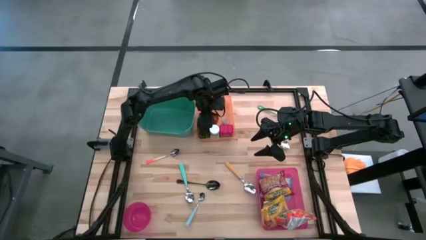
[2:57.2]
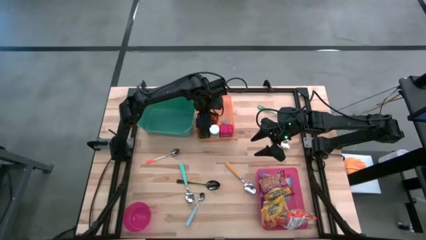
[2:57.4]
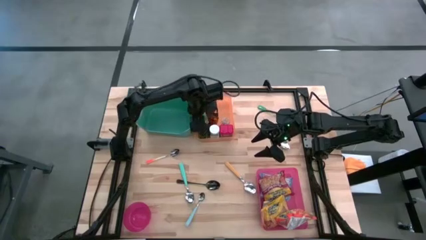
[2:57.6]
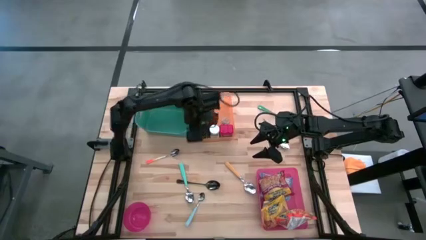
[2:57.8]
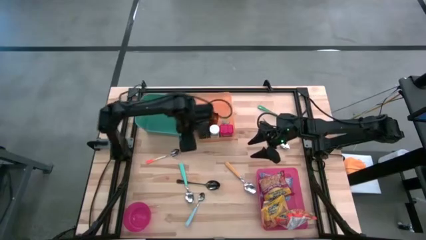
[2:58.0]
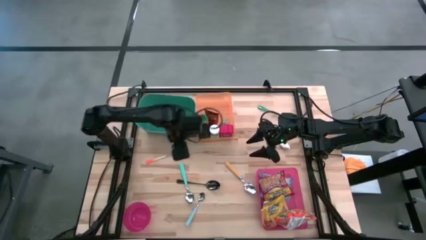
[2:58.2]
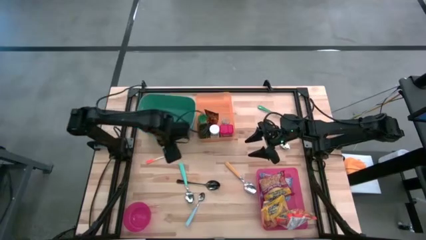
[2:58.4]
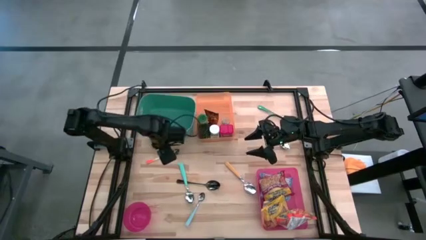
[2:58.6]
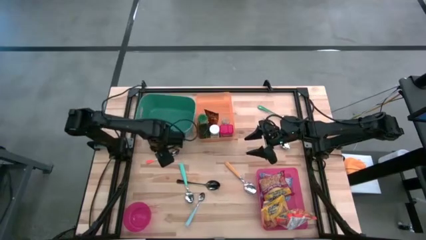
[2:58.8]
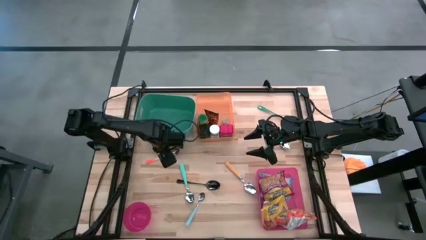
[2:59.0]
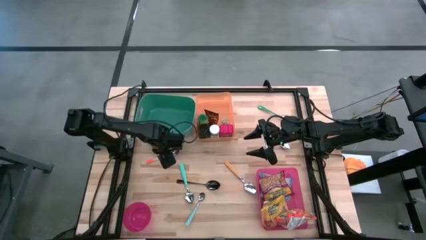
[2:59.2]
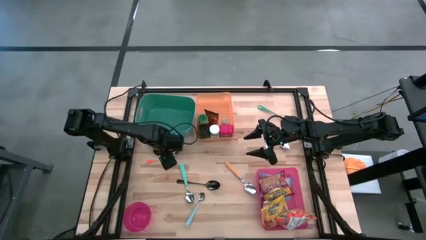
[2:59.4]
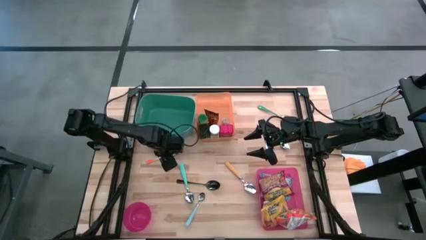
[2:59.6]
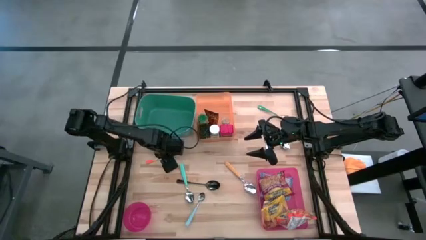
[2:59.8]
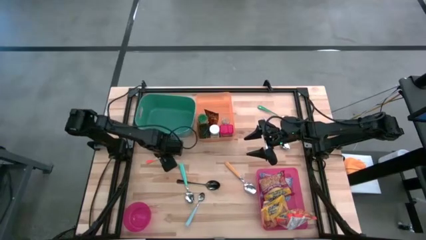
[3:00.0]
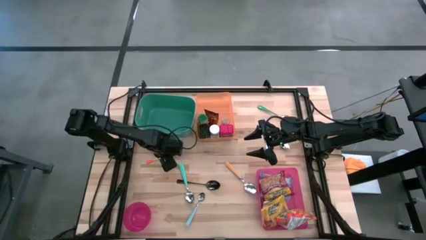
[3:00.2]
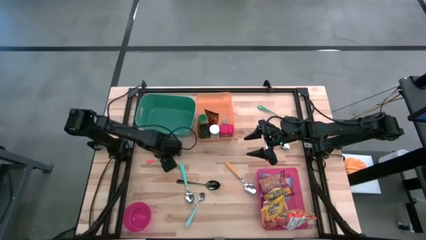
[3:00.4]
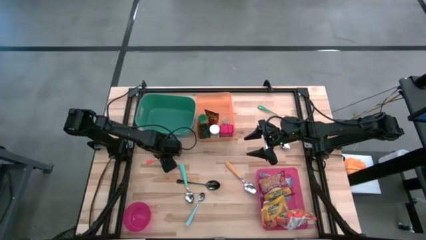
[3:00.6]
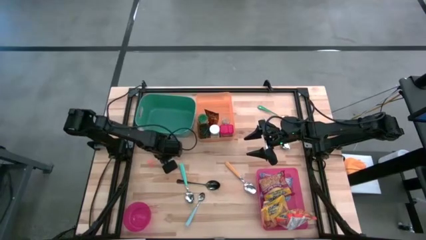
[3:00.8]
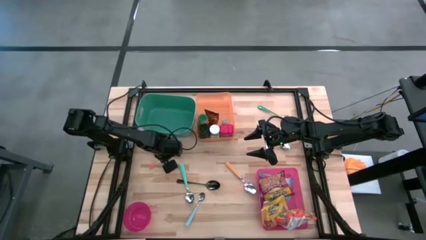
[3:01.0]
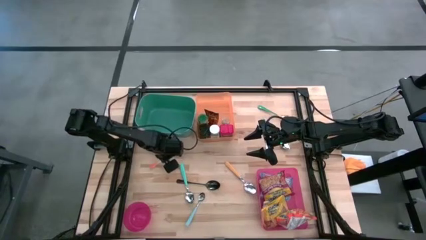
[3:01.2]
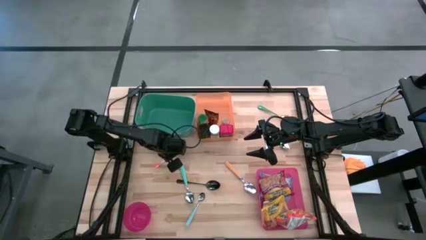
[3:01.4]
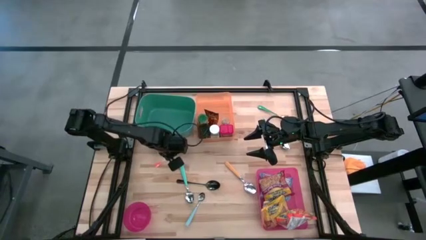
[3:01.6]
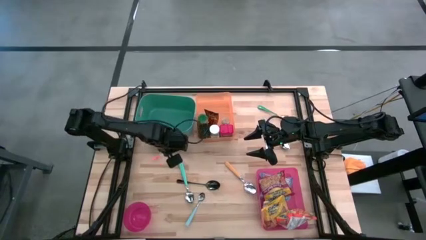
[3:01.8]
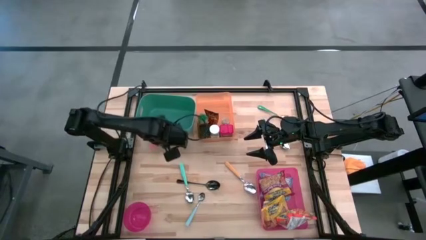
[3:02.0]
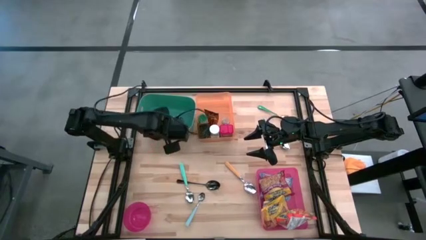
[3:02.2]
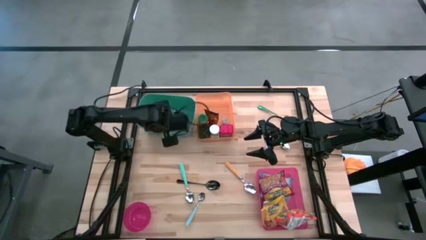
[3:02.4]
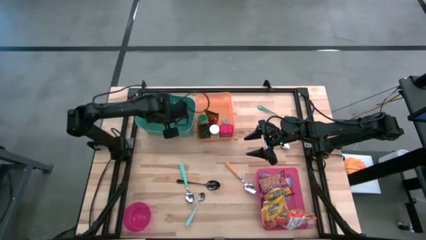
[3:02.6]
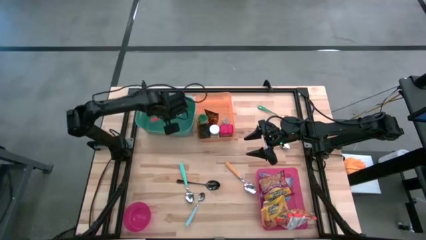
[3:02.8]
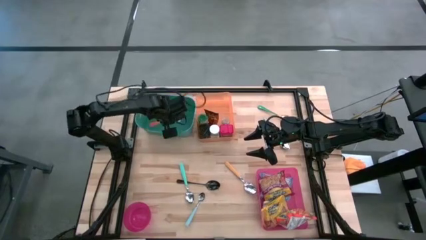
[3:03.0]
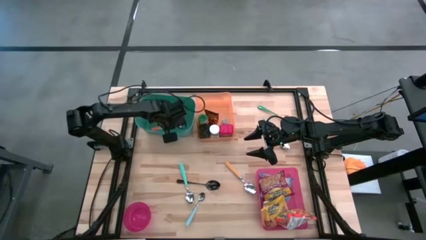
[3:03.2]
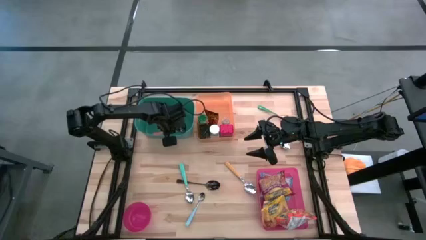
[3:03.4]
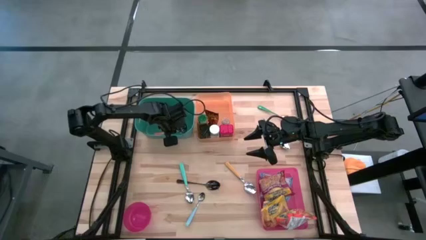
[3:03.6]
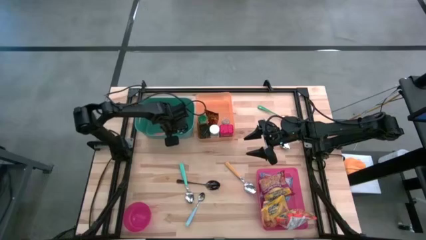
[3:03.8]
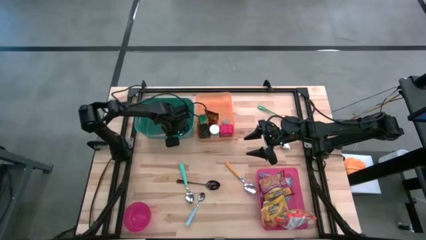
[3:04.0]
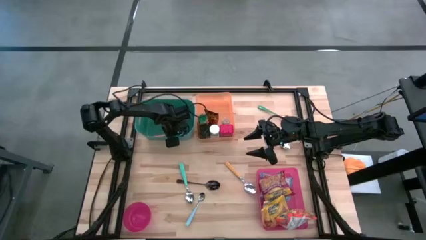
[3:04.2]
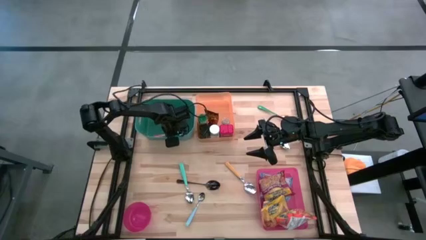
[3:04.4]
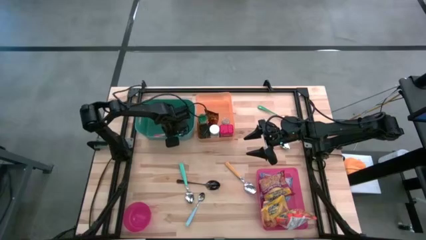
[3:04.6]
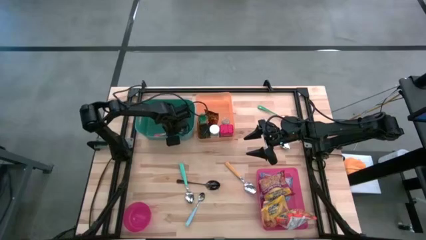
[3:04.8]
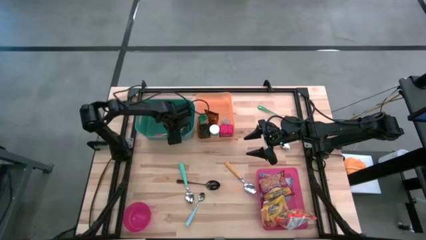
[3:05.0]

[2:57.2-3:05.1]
Put the orange spoon into the green bin

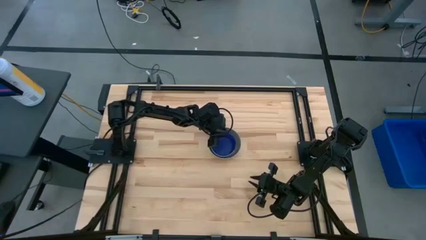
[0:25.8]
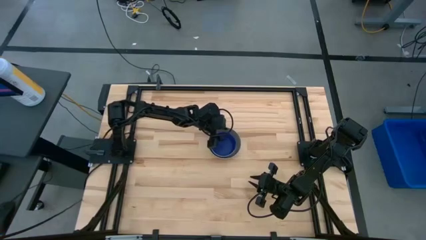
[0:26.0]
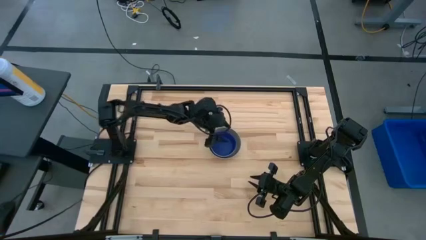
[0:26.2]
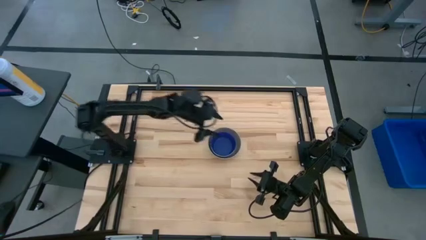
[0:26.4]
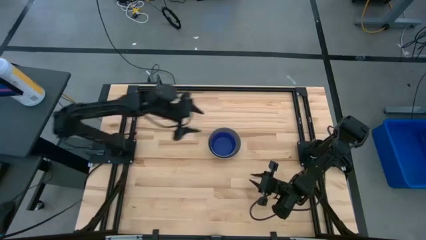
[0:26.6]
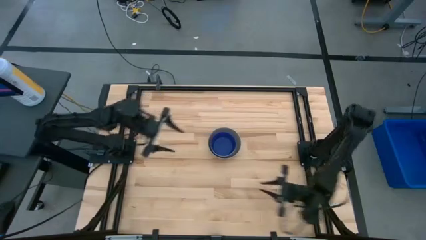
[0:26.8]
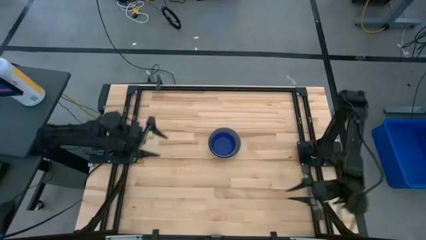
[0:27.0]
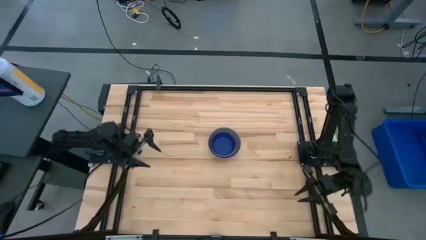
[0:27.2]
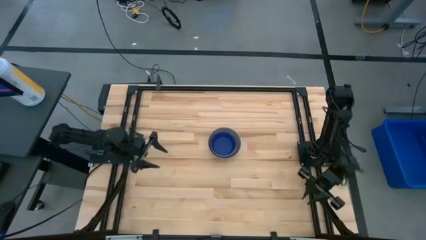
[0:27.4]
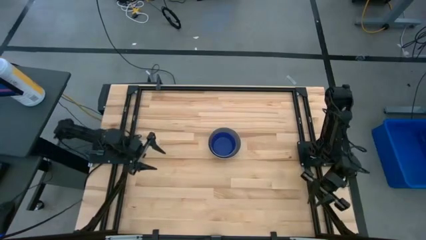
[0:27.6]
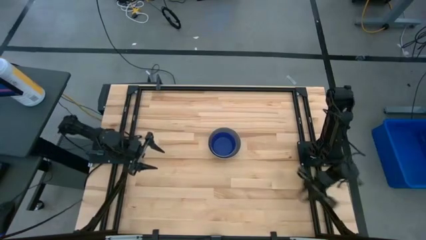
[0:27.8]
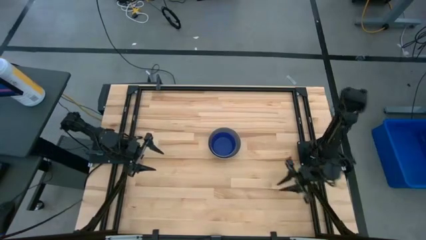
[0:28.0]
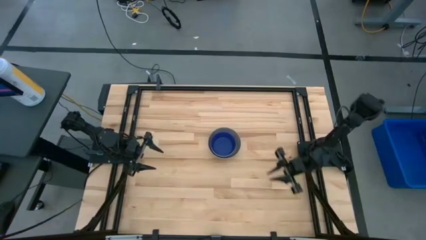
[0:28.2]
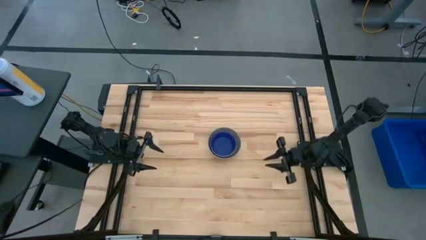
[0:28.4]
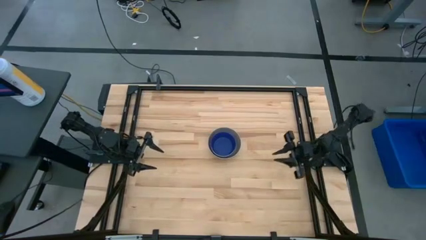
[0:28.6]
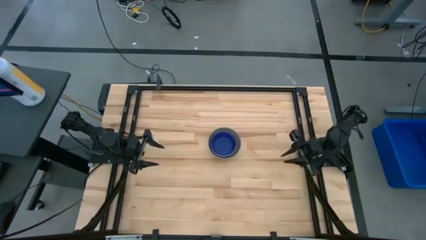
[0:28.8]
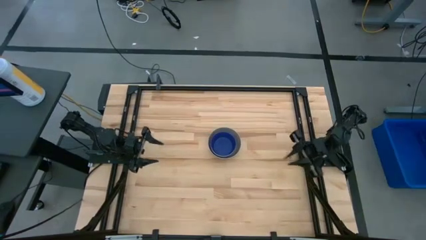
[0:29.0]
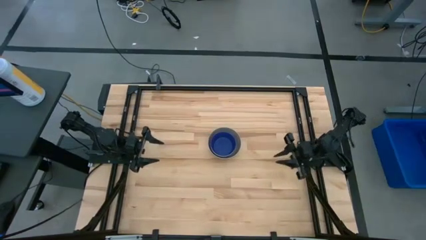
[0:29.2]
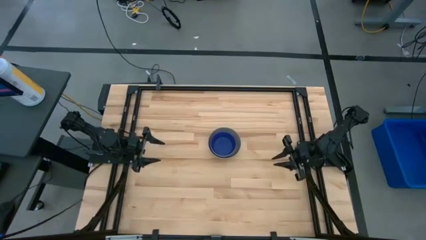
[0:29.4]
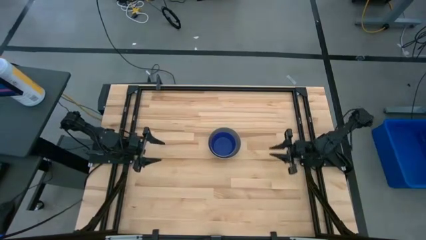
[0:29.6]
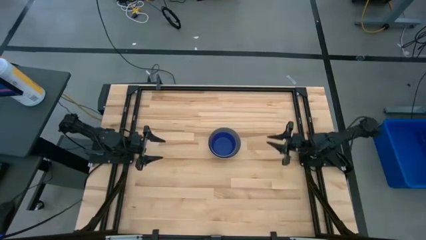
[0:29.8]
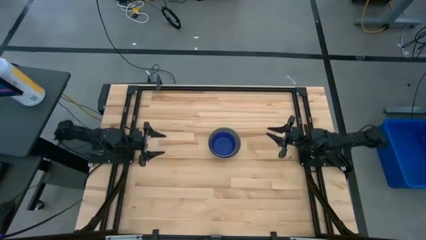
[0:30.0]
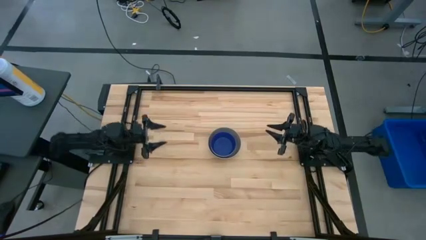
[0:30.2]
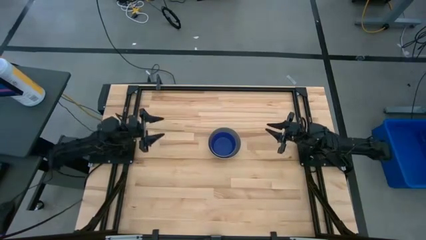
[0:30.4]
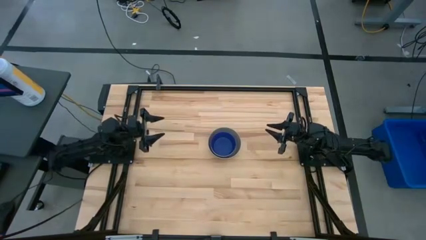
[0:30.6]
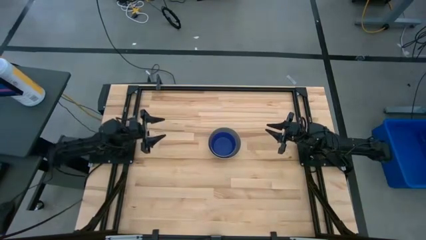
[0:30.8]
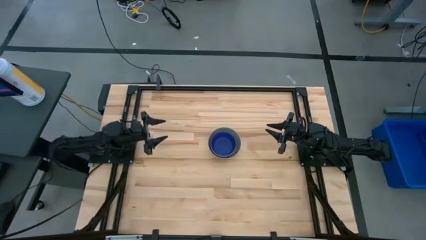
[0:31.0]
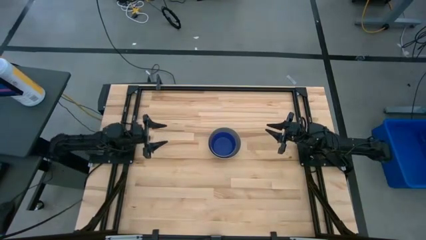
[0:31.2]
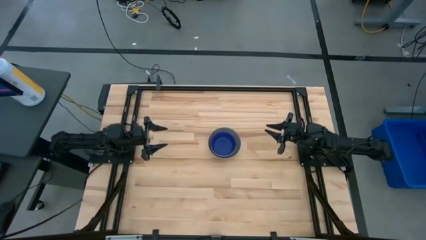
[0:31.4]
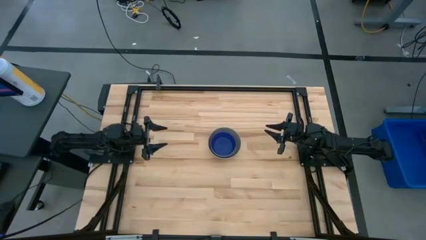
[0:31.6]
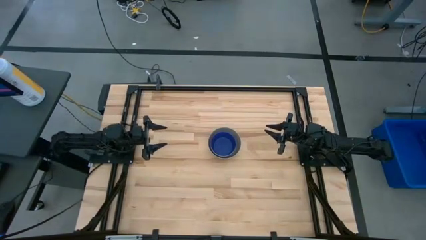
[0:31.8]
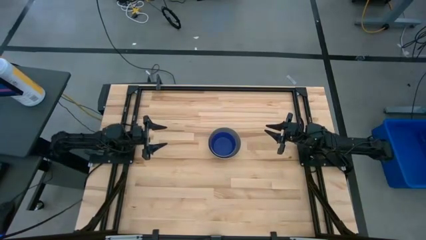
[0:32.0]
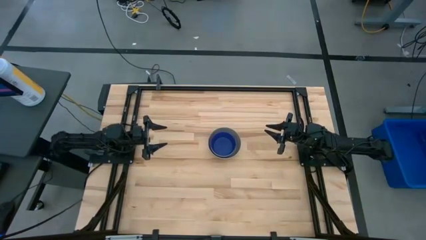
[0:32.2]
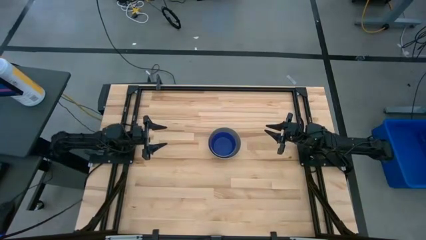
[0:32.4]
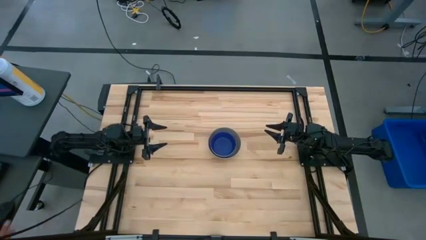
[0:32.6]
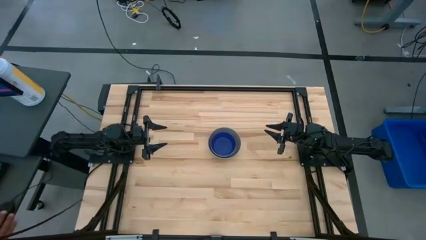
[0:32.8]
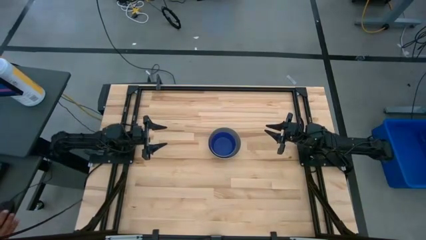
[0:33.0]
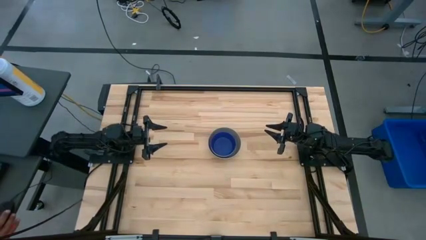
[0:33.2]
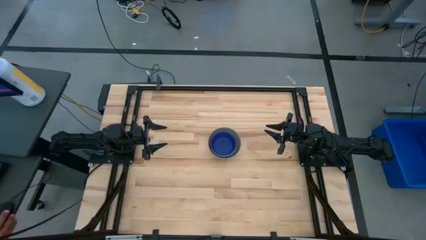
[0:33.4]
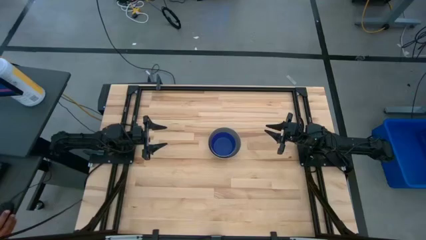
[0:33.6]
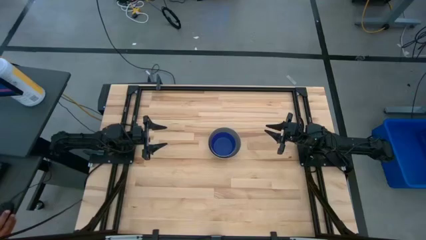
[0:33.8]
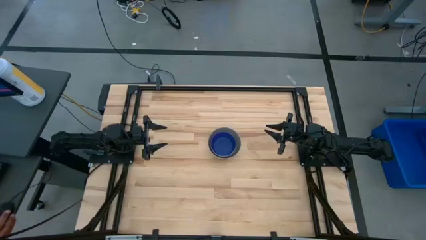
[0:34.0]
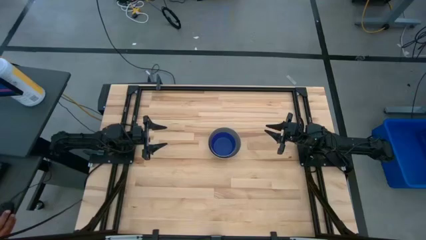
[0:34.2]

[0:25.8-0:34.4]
Return to Home Position
